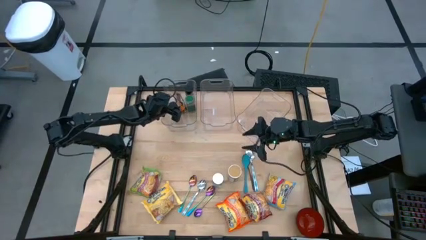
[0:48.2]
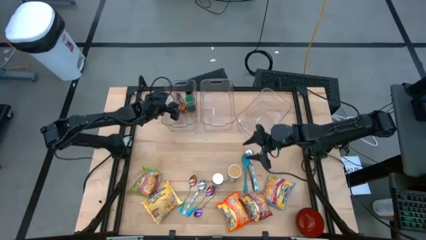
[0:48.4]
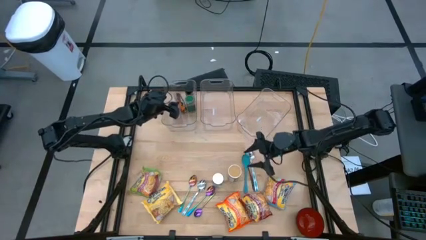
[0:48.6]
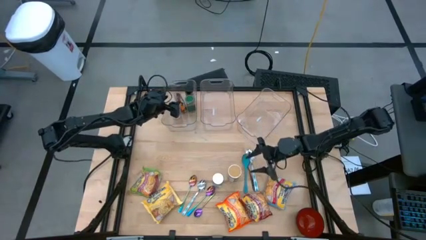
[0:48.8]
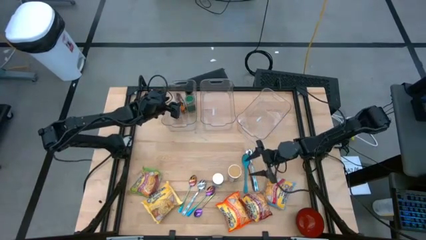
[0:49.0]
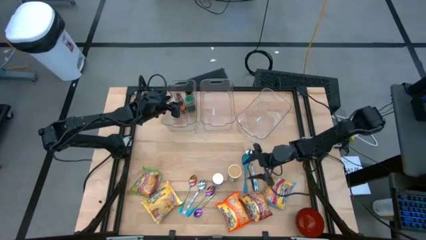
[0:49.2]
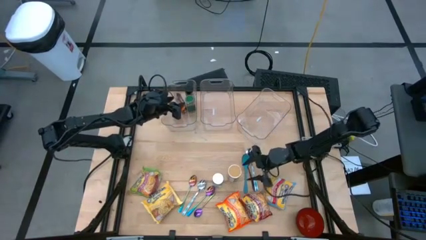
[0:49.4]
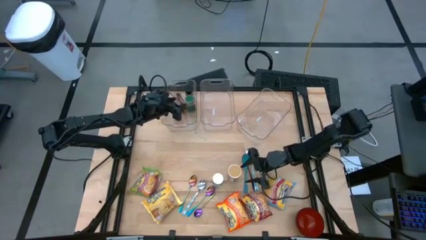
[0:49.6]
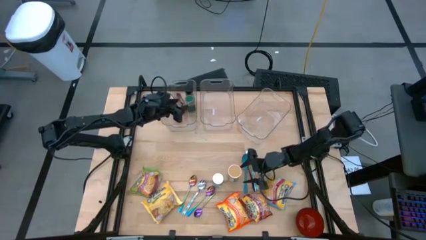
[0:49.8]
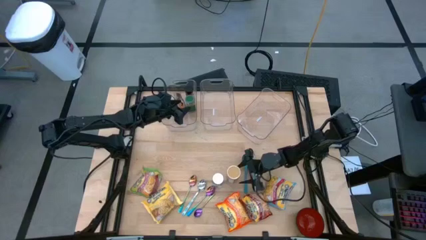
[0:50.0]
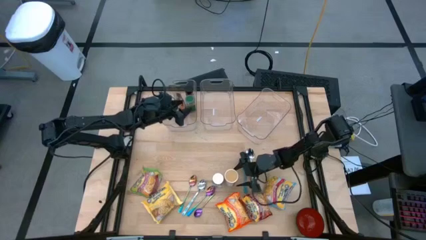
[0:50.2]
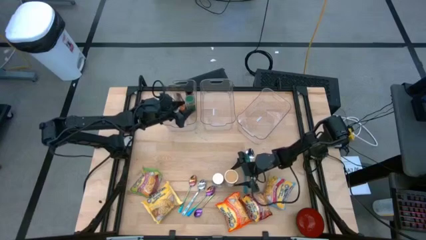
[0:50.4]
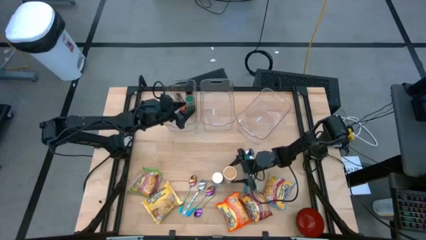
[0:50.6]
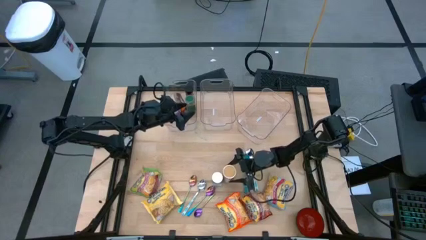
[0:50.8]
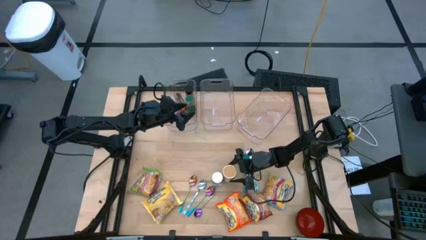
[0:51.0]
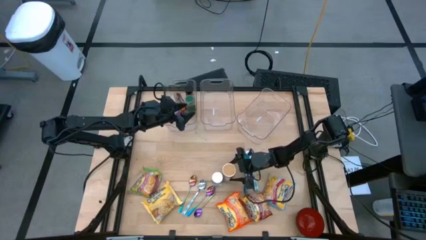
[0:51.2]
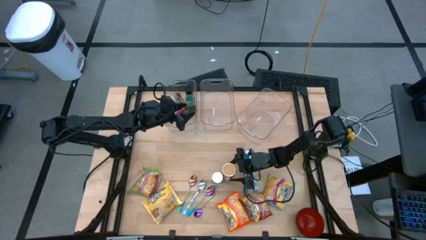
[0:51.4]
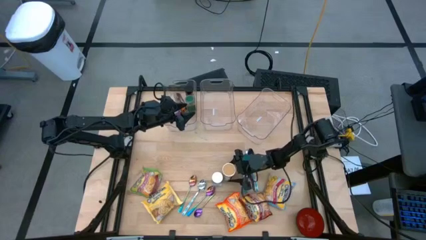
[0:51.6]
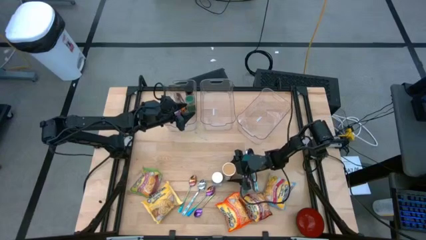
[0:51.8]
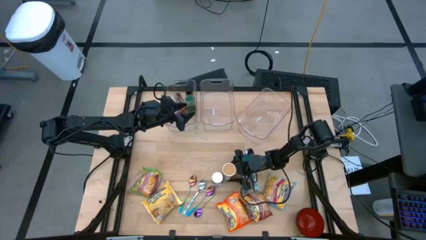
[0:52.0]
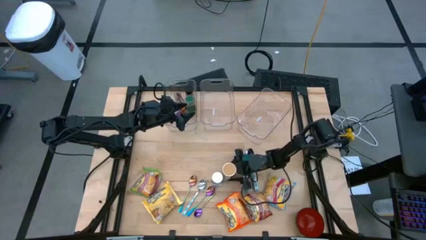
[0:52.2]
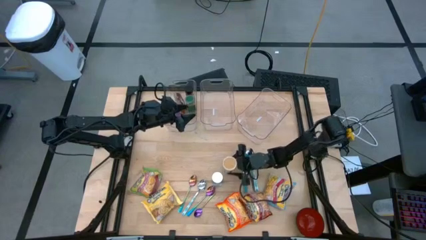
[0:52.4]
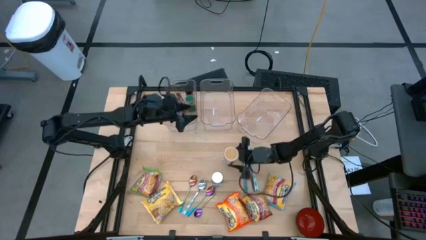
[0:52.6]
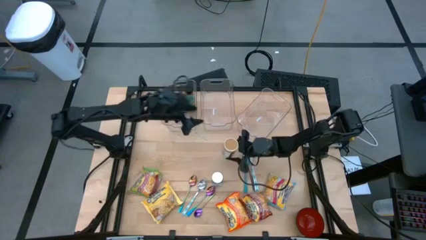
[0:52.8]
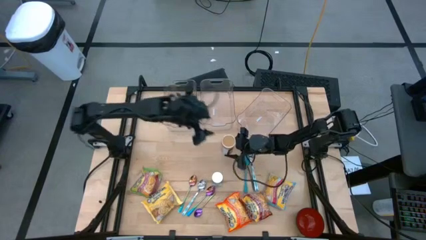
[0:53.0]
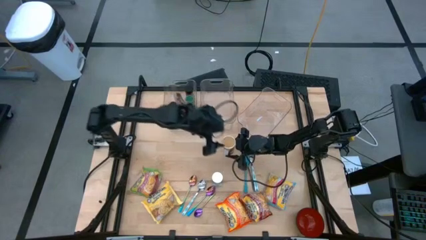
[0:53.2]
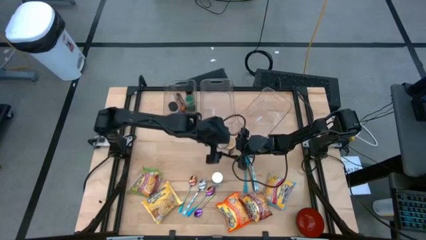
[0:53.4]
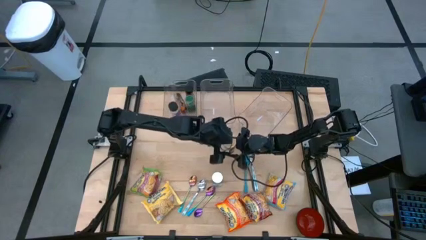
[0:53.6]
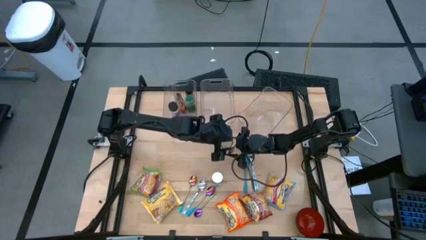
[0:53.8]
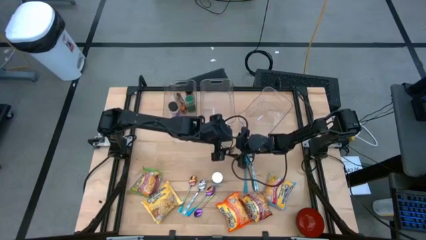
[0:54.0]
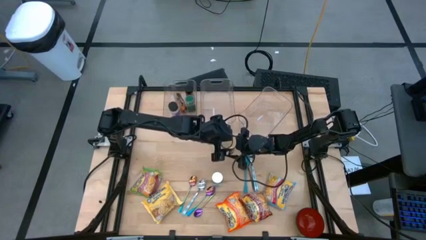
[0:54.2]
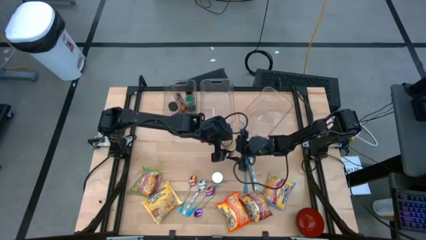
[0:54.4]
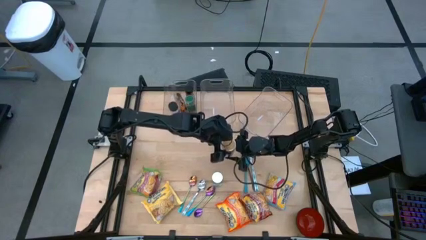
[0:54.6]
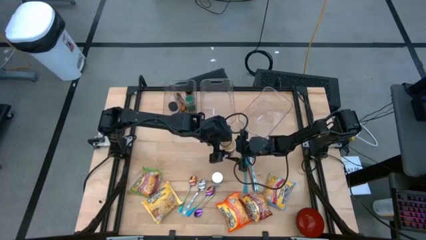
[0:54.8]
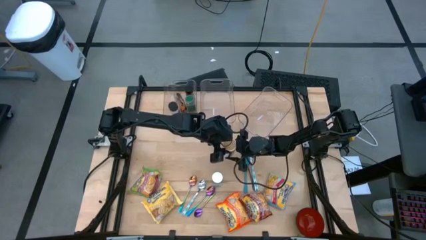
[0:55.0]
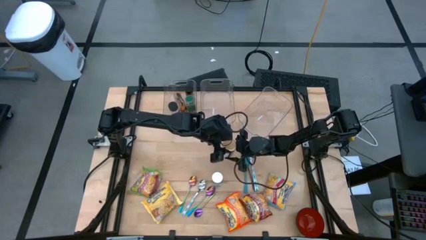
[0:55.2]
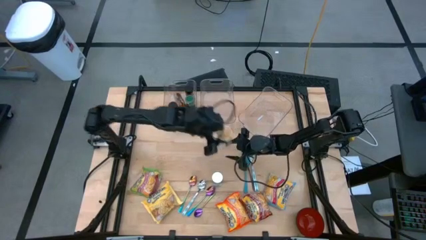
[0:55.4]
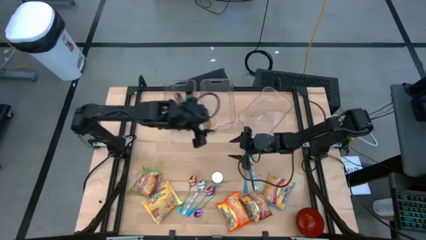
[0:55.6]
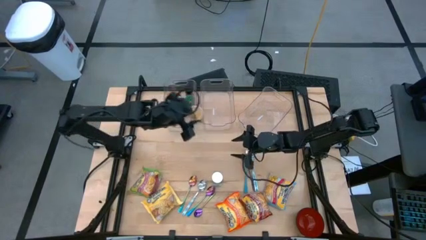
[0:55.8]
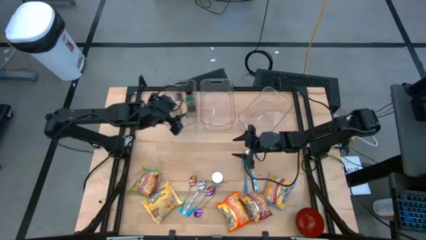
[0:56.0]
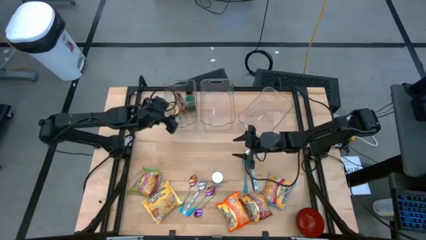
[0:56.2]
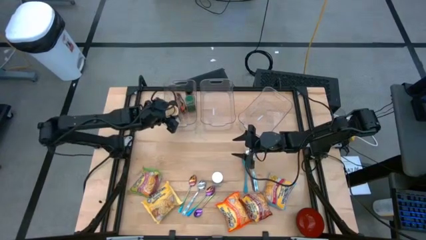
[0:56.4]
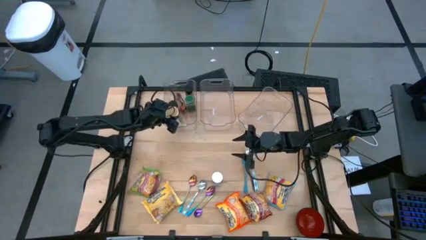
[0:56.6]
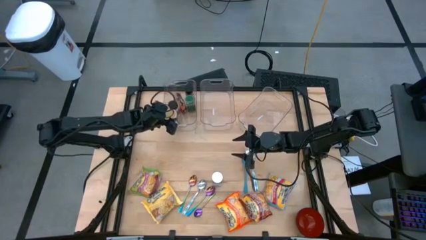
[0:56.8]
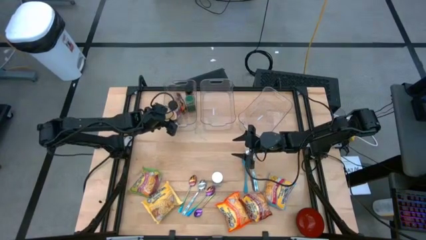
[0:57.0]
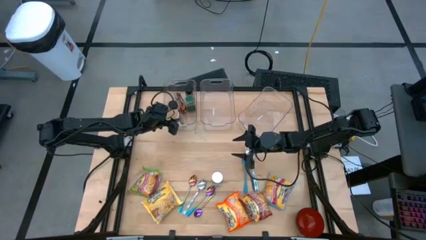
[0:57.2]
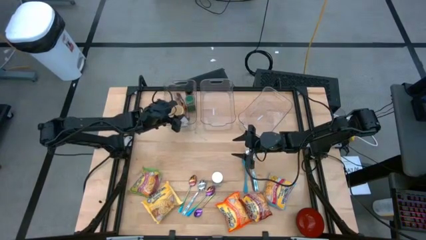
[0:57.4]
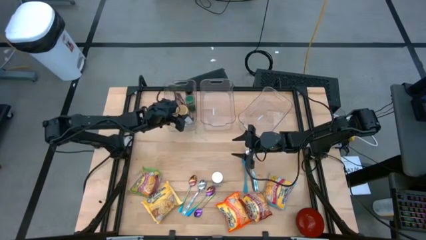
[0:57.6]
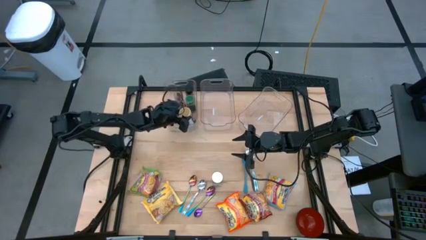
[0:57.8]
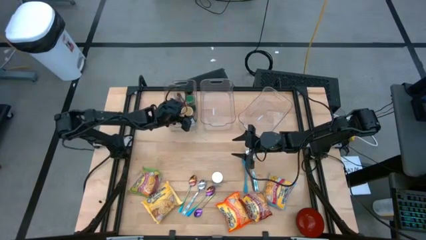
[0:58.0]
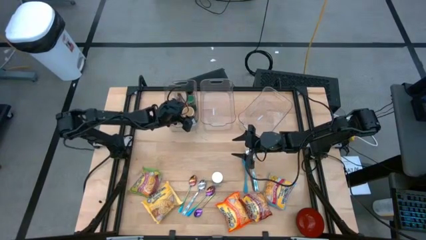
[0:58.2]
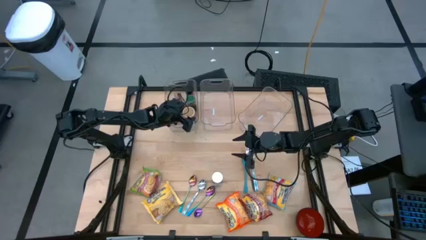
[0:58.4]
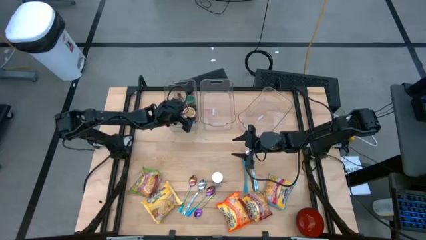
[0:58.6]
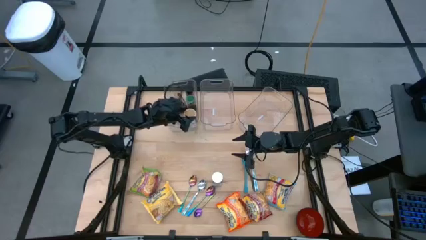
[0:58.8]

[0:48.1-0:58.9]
Task: Pick & Place Food Item
Put the gold seasoning bottle into the left transparent bin

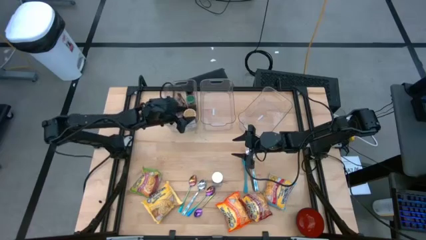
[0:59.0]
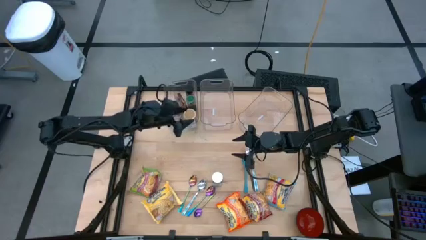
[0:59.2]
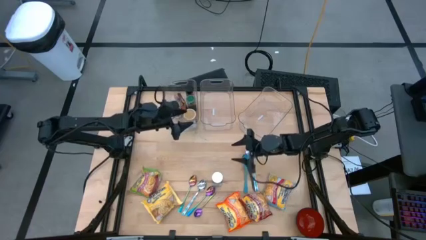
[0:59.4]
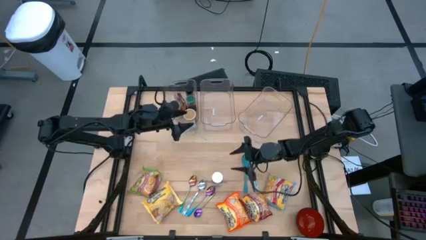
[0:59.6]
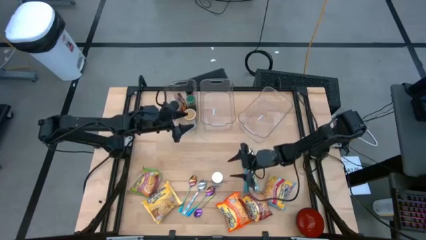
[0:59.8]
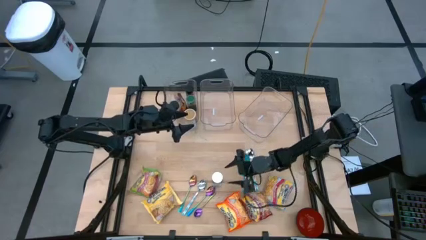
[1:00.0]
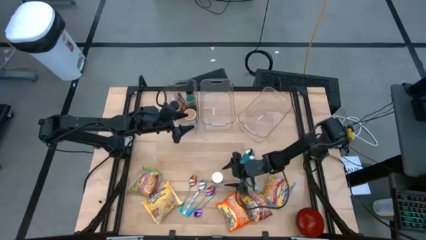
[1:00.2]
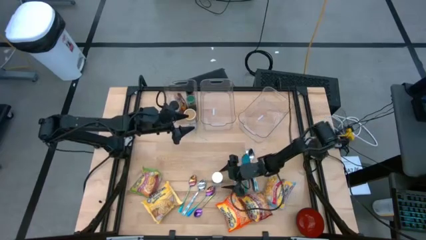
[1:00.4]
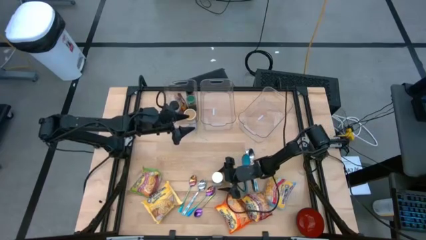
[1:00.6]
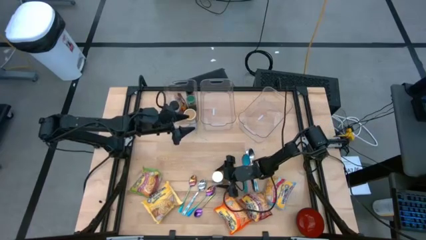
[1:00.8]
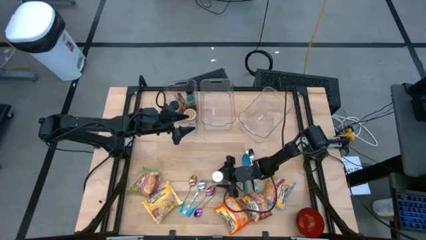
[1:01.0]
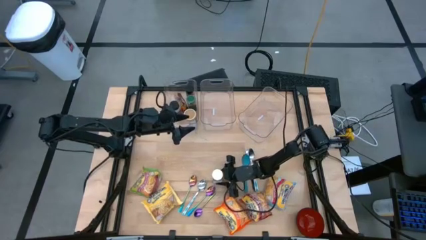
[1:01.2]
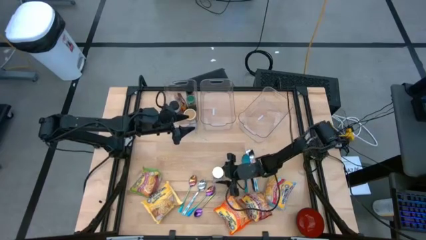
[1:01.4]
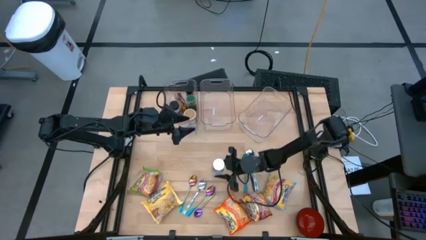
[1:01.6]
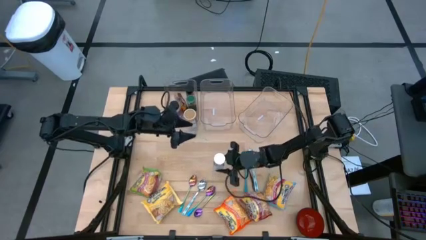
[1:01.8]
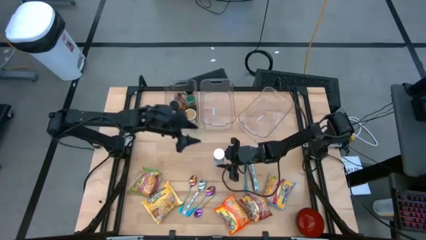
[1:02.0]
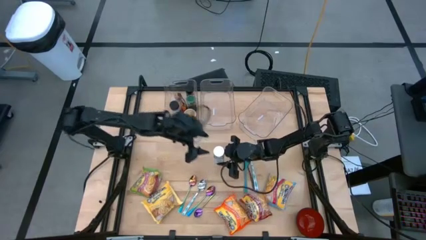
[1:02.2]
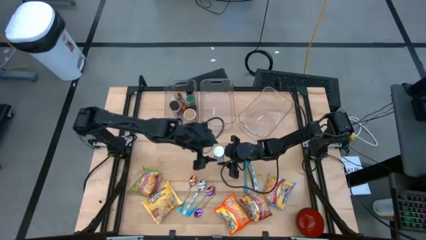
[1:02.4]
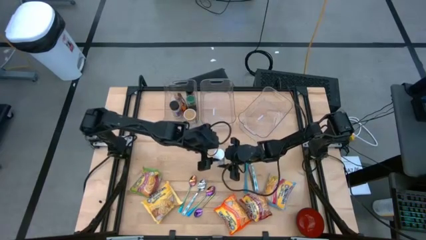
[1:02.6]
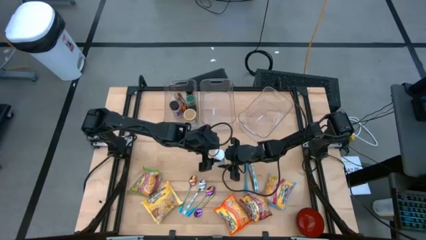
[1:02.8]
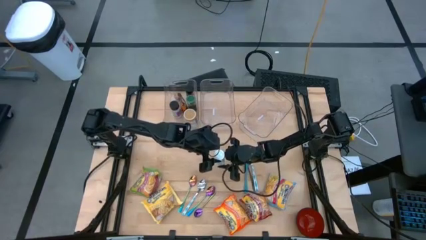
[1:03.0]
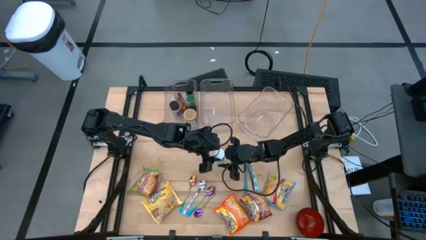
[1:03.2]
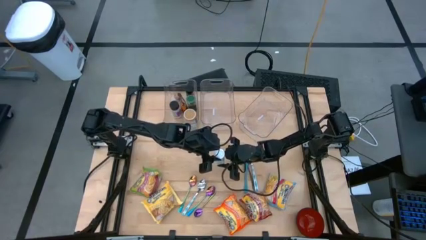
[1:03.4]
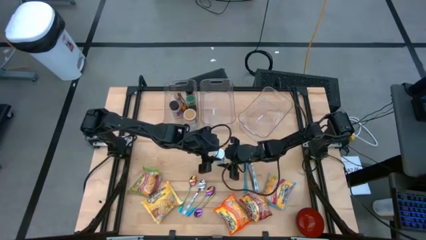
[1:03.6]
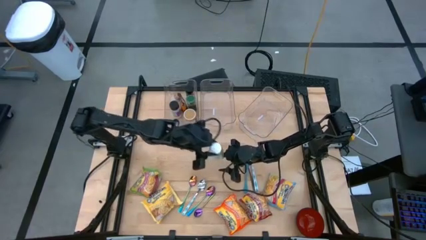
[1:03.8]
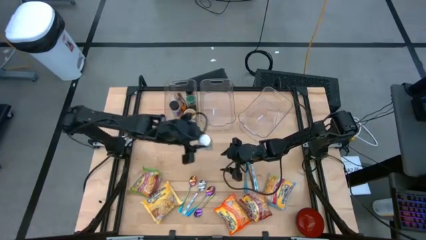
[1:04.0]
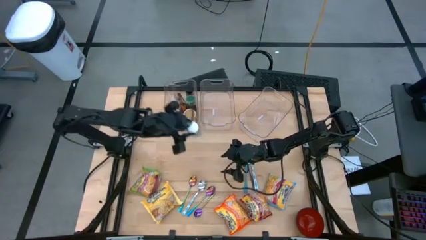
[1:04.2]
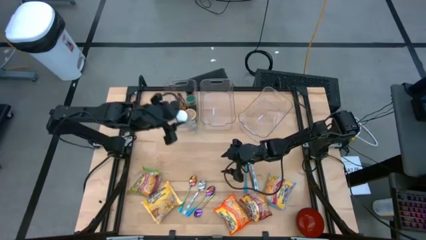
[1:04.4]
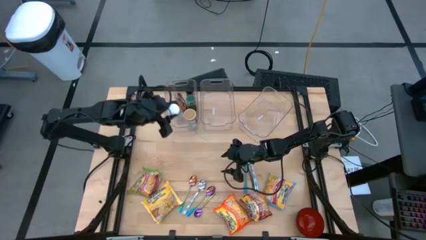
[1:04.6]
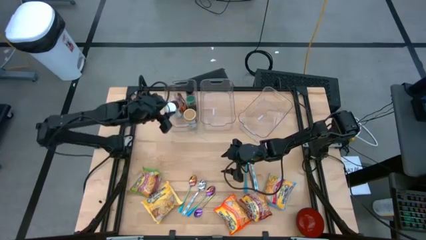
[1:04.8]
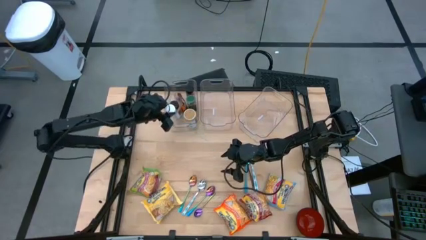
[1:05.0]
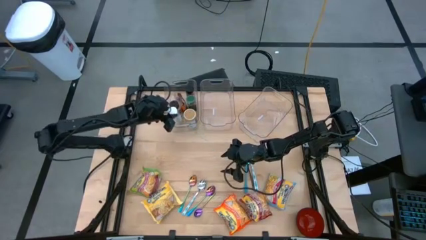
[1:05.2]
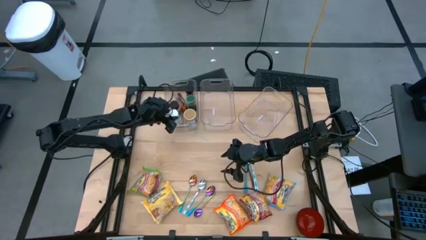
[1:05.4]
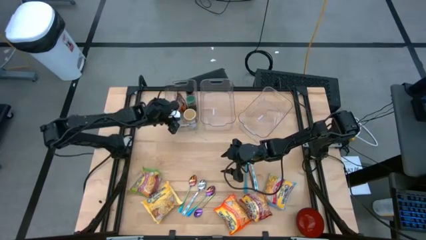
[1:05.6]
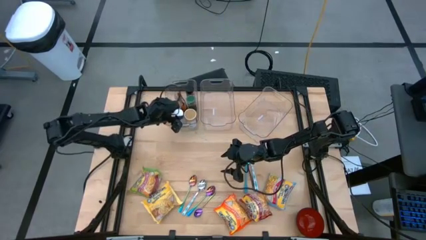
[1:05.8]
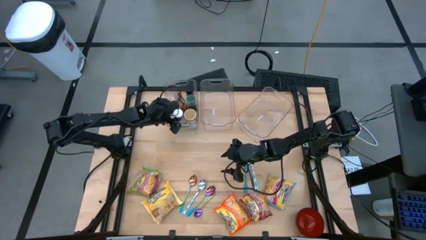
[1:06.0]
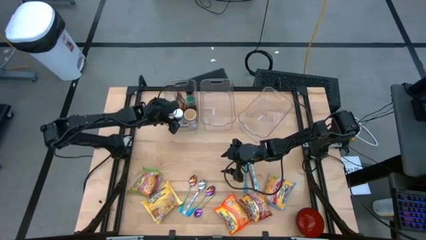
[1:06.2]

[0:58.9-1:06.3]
Put the white seasoning bottle into the left transparent bin
